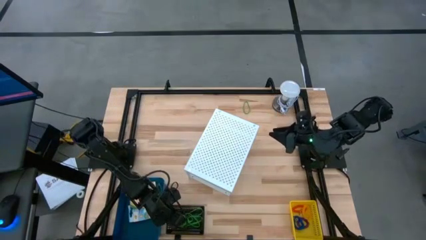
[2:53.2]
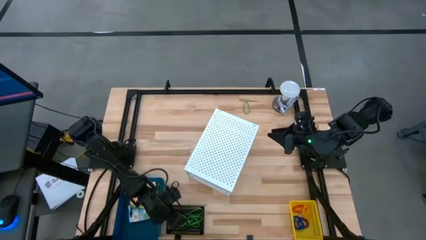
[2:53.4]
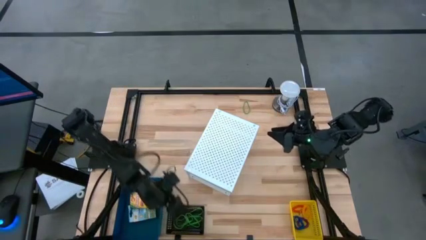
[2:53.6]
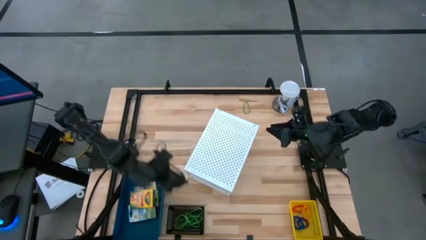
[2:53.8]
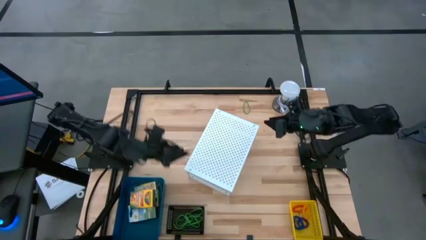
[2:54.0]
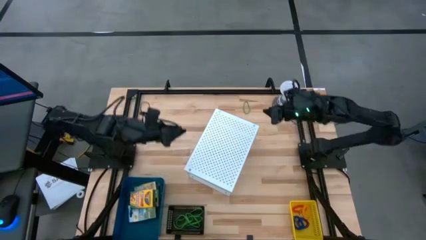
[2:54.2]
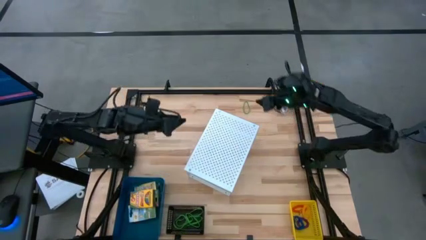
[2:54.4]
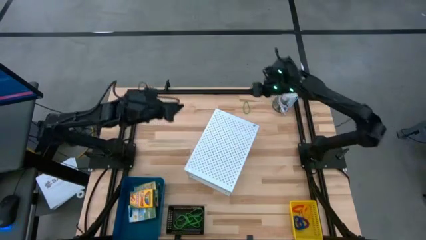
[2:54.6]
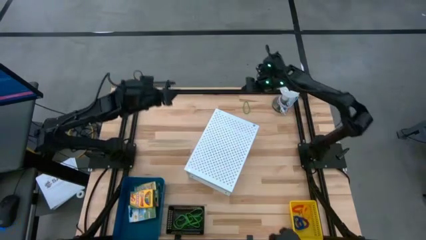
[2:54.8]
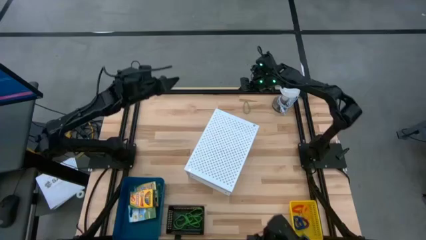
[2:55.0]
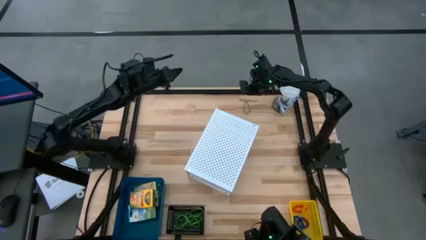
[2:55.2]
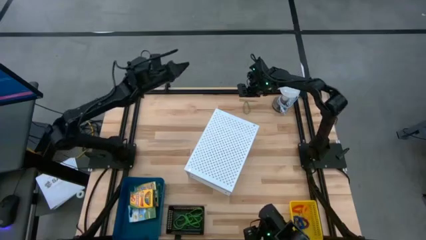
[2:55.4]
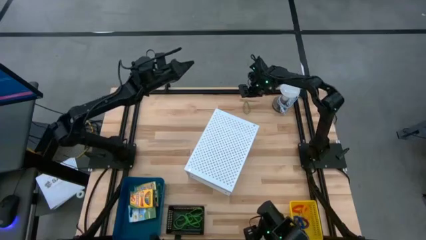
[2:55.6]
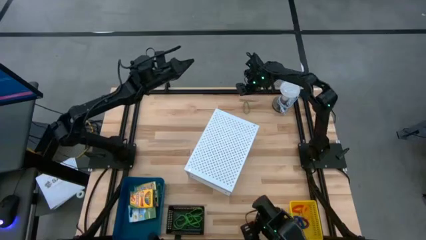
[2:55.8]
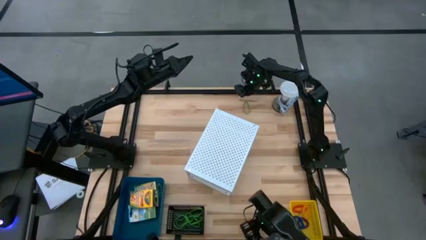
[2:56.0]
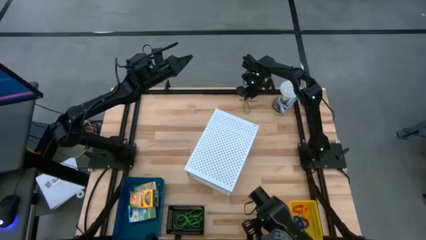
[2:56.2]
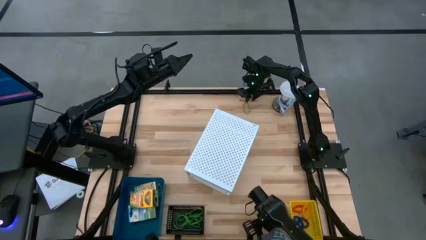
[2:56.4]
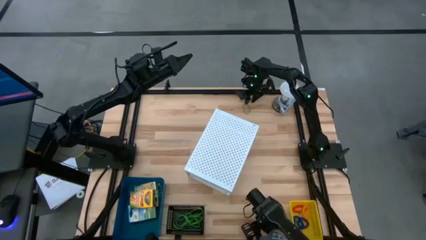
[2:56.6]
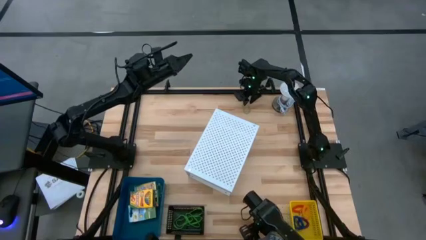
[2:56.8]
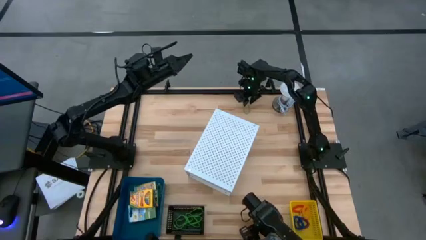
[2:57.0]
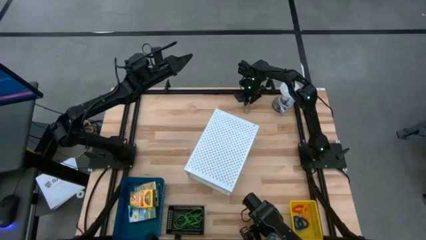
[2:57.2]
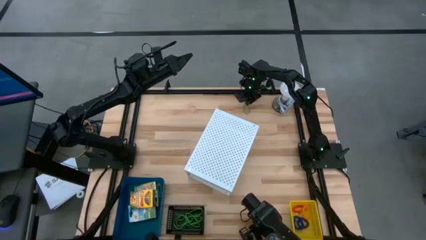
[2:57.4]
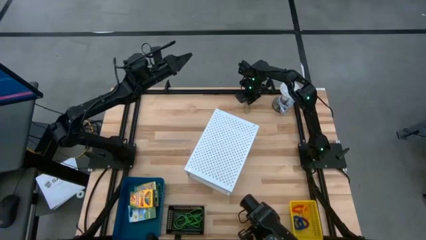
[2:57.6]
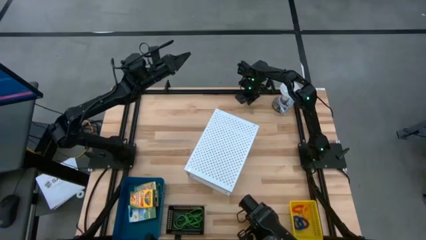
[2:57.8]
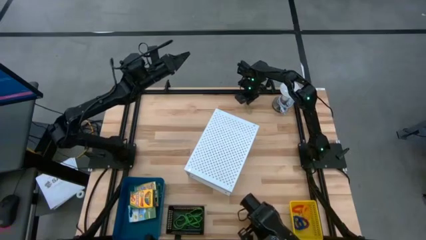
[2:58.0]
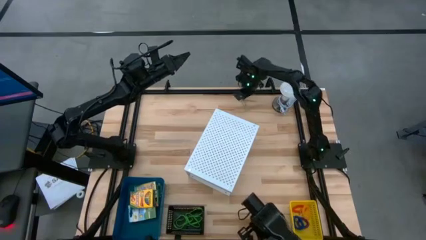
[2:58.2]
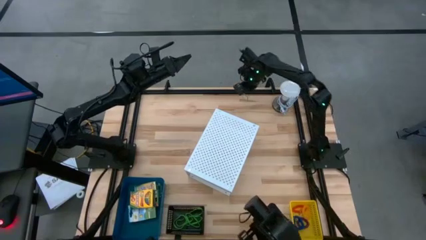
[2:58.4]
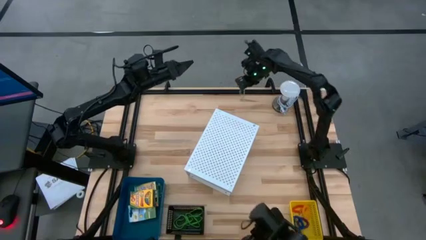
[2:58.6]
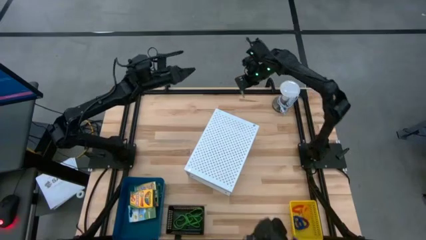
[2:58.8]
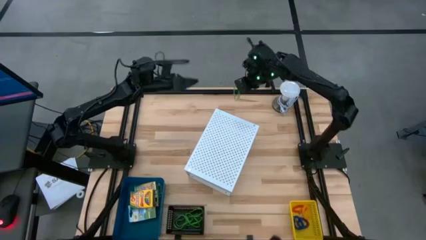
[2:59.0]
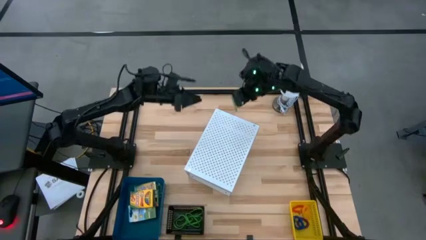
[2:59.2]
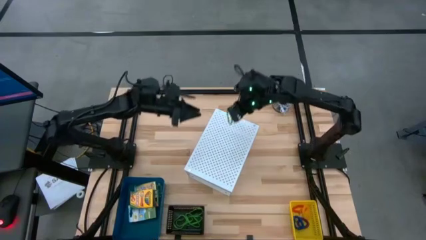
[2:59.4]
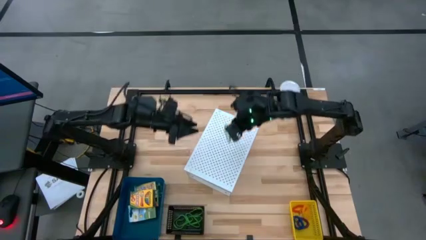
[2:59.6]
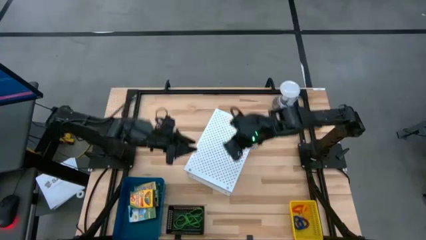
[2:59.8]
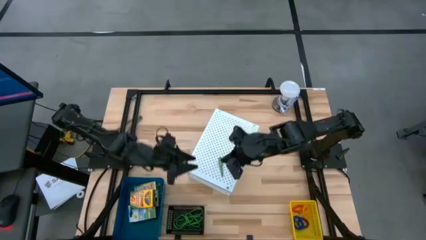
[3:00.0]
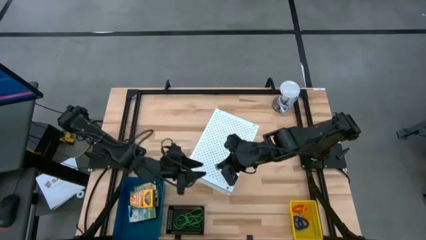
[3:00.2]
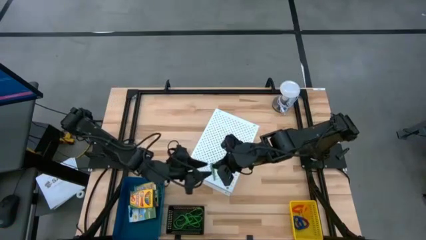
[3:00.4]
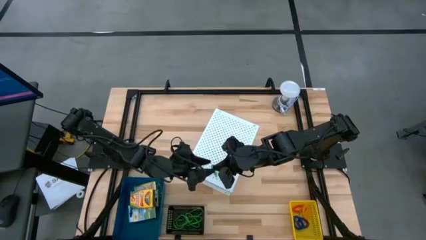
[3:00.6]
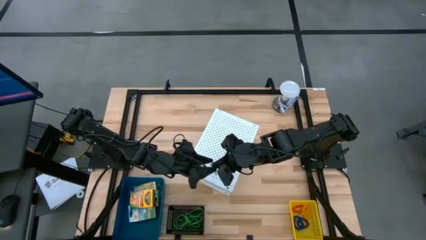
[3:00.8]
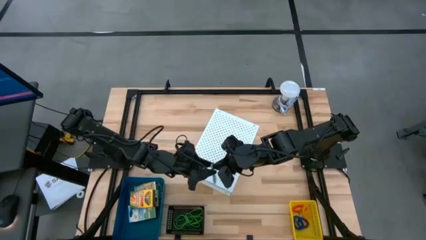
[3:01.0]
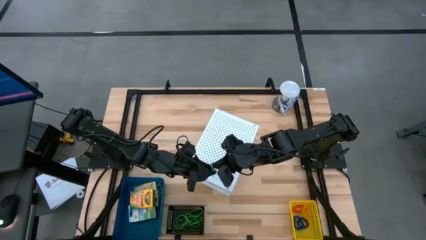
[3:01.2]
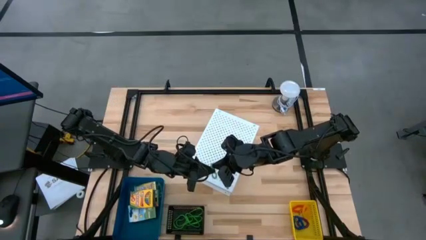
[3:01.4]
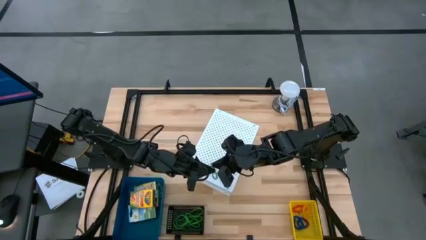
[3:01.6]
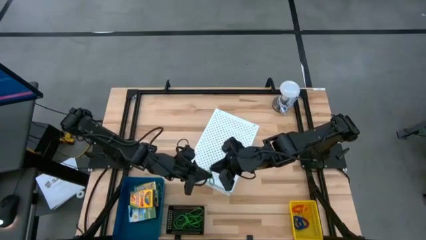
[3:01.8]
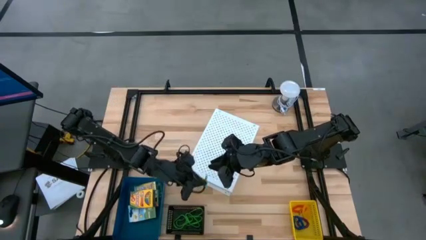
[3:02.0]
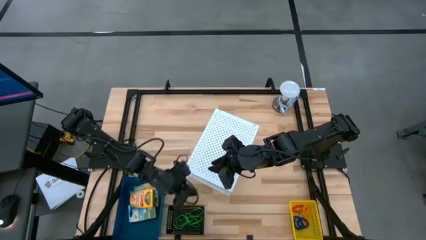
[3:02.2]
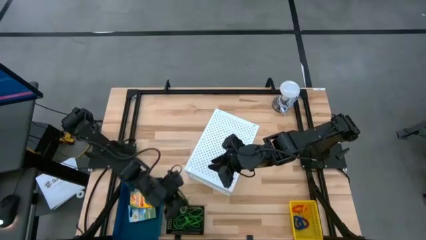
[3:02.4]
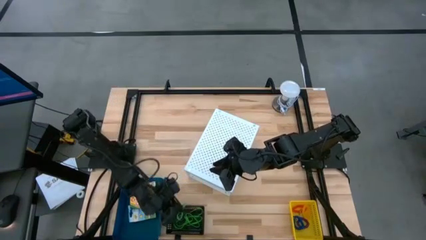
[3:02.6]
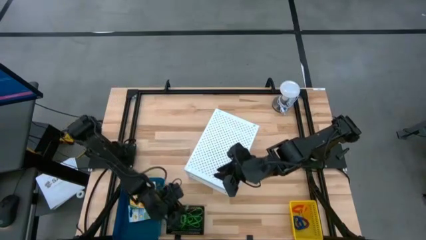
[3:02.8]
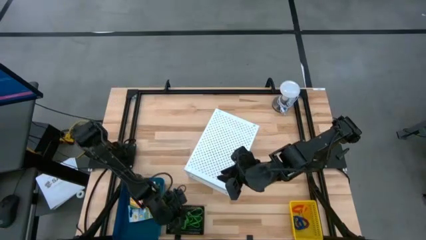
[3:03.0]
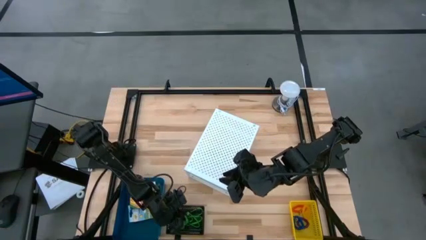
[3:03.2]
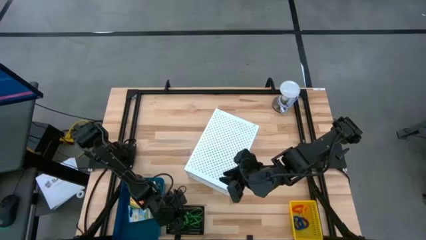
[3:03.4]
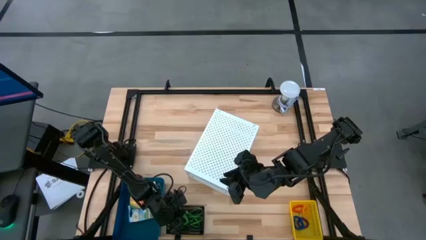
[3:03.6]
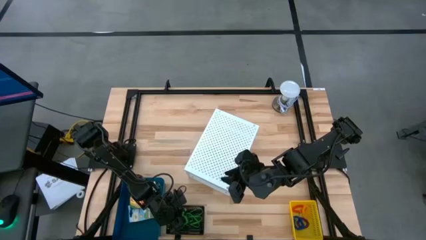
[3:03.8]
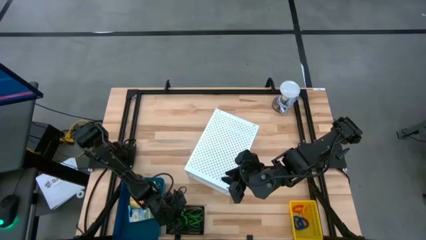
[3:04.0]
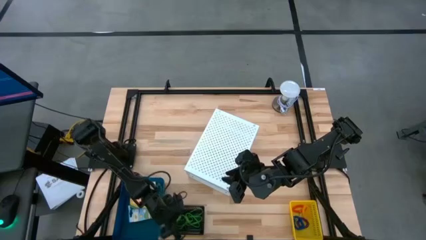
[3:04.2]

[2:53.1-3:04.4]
Task: Pick & Place Office Desk Supplies
Put the green rubber band into the black bin

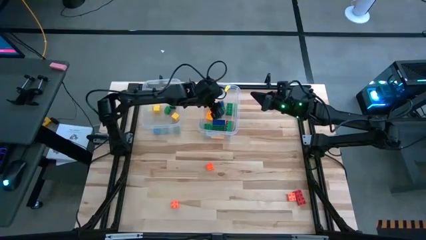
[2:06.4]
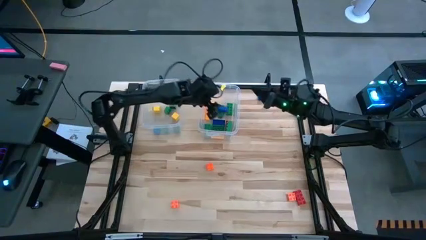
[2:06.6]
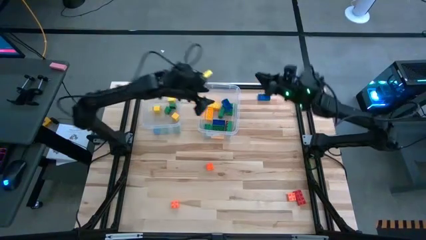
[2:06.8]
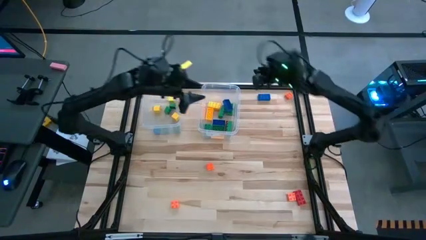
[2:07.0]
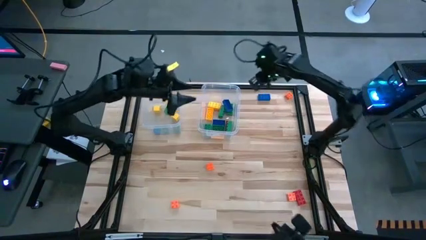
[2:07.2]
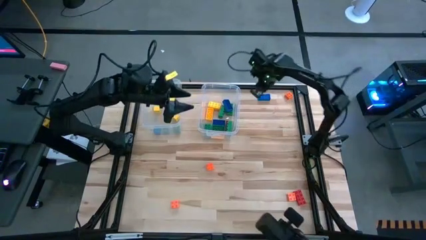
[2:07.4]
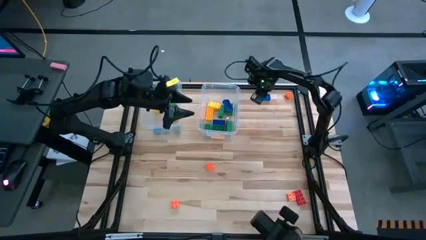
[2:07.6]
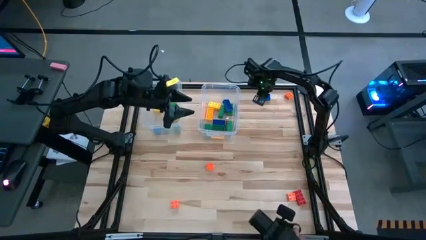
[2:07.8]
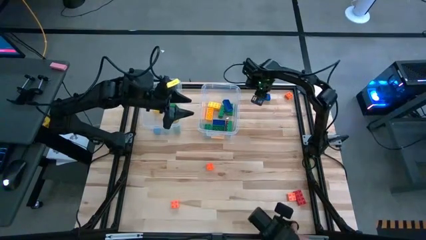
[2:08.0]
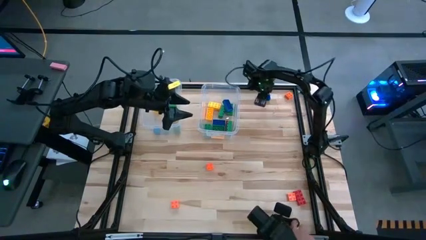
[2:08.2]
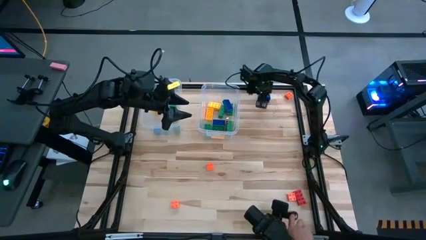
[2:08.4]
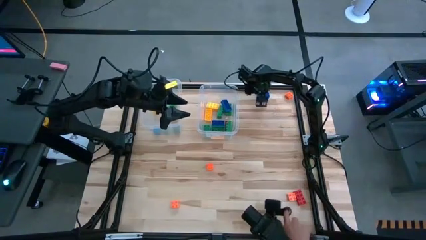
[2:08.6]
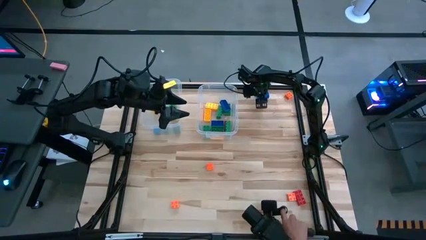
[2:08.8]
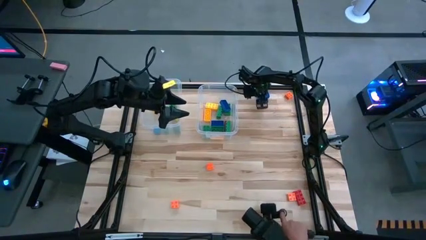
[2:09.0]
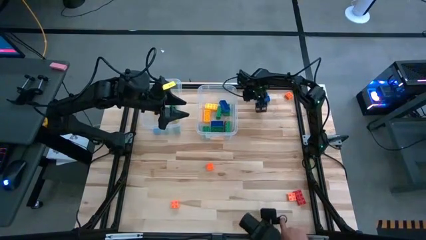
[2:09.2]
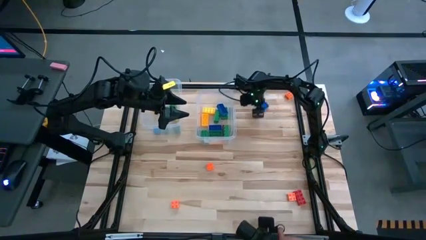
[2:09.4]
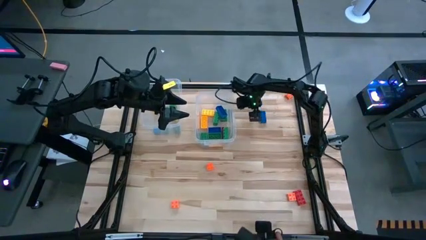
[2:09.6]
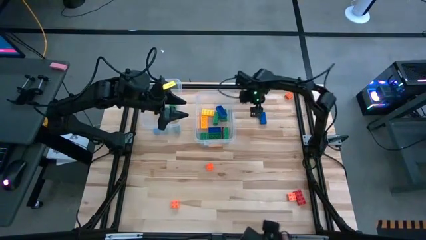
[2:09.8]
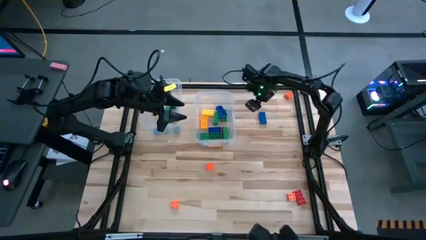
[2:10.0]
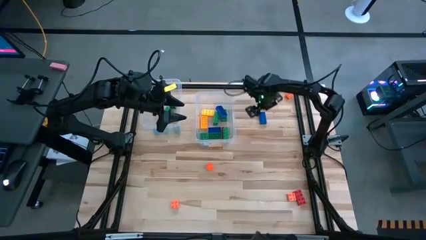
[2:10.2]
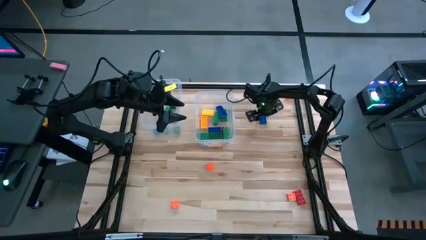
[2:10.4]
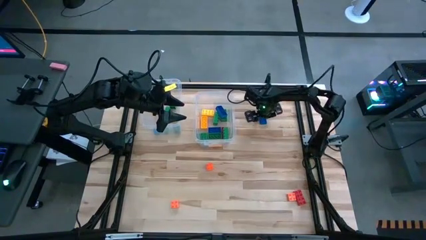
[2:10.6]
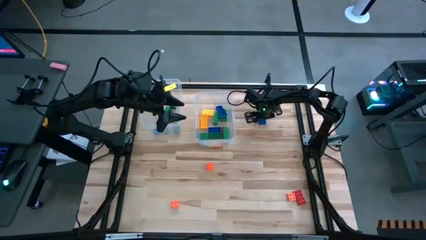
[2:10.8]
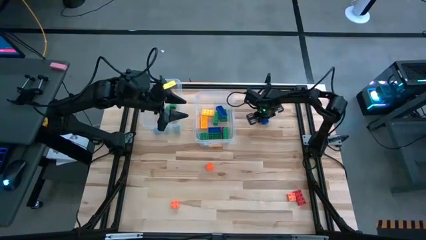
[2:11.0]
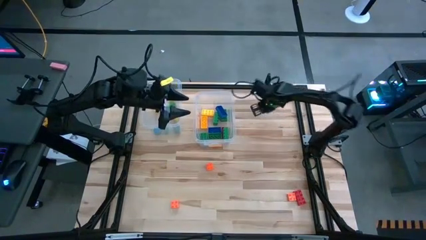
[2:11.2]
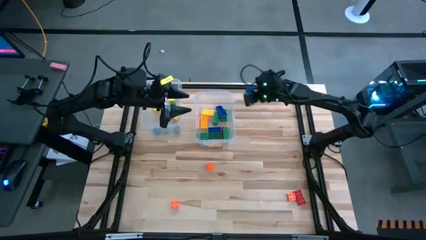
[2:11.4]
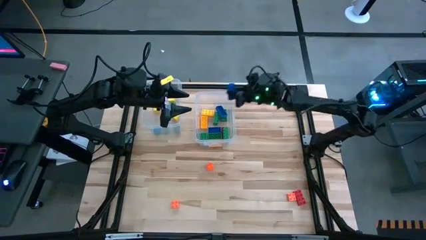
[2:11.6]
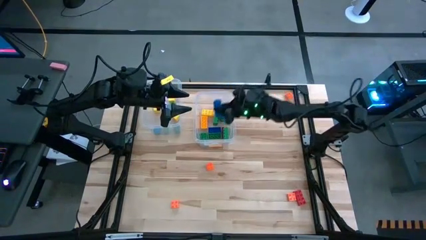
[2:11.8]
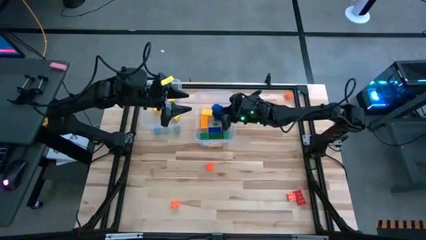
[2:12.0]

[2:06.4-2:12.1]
Task: Sort blocks by size
Put the blue big game piece into the right transparent bin
